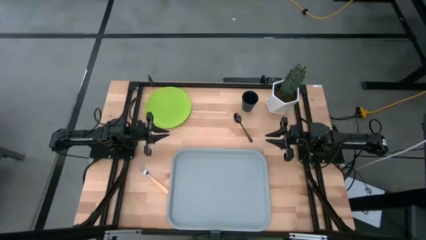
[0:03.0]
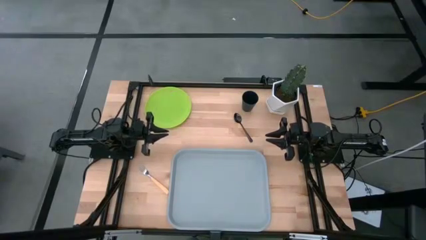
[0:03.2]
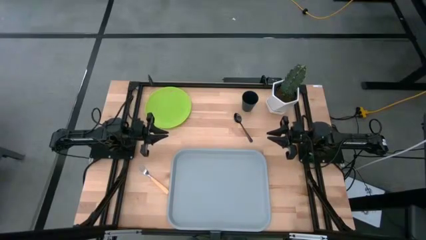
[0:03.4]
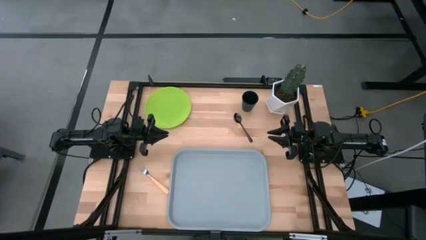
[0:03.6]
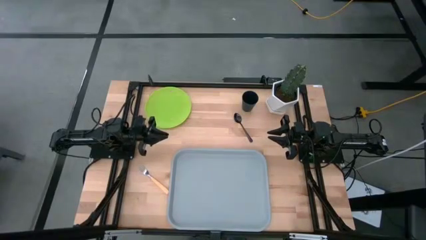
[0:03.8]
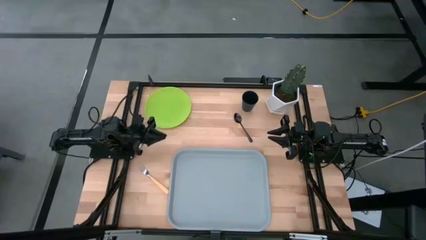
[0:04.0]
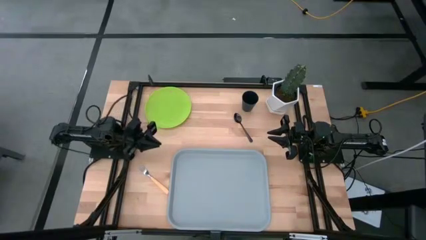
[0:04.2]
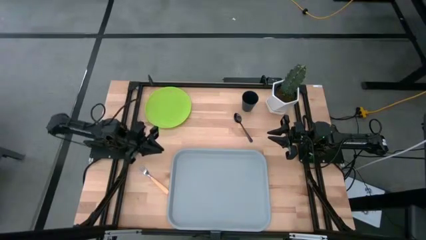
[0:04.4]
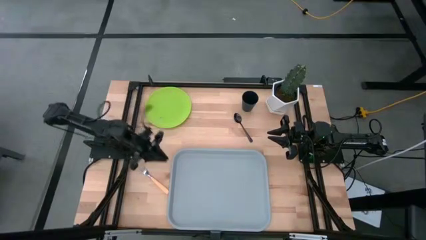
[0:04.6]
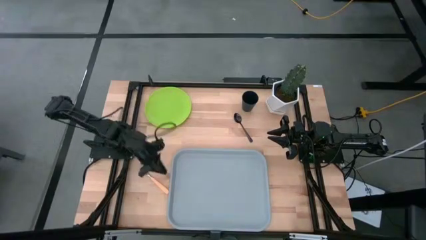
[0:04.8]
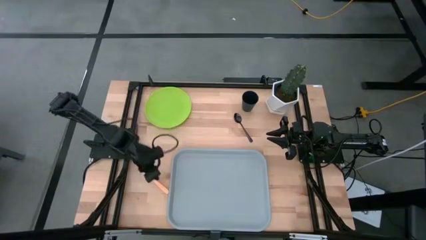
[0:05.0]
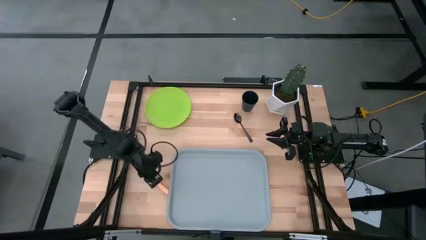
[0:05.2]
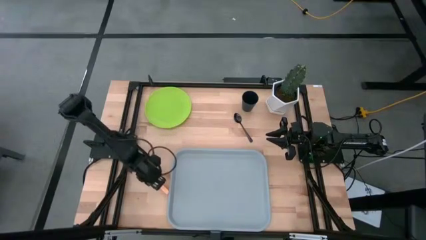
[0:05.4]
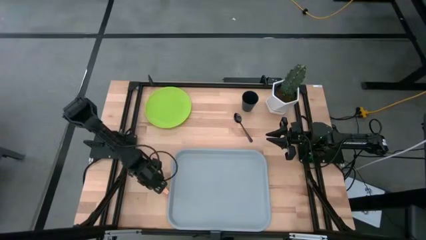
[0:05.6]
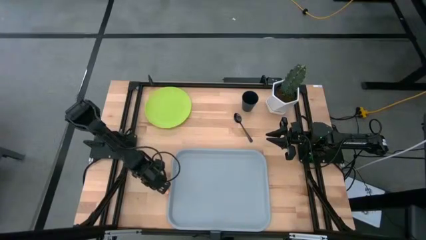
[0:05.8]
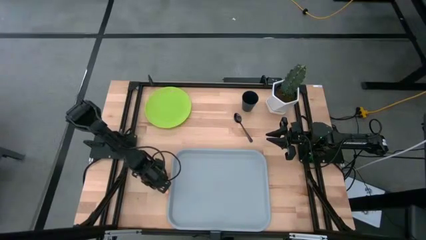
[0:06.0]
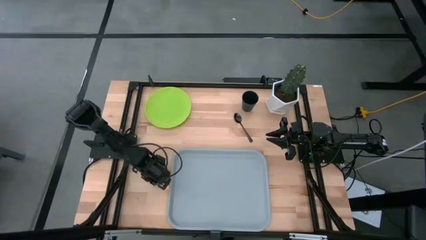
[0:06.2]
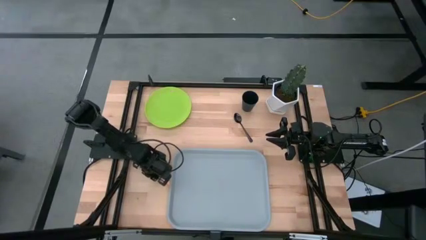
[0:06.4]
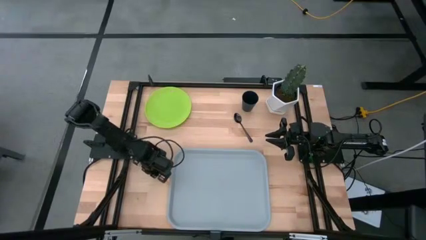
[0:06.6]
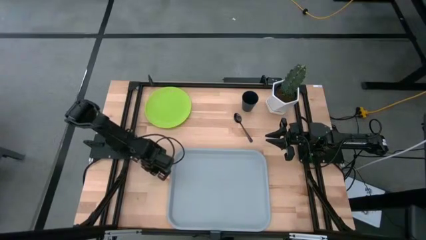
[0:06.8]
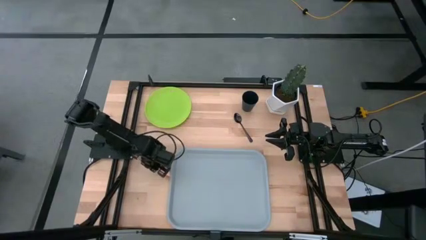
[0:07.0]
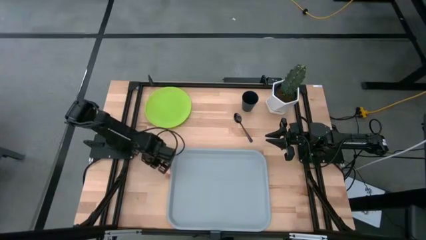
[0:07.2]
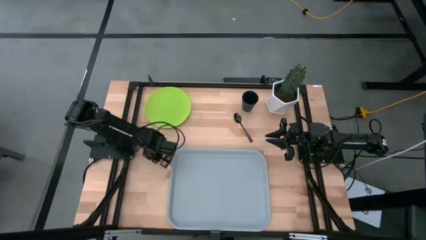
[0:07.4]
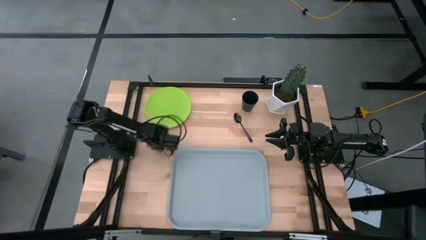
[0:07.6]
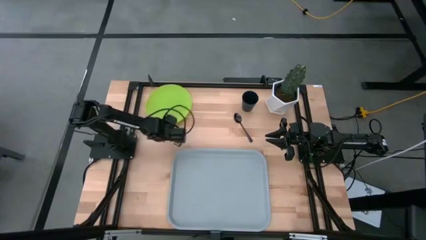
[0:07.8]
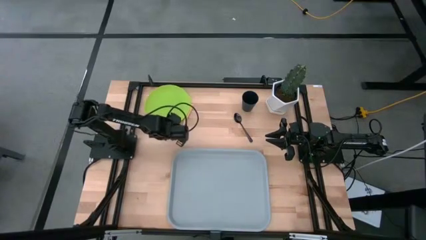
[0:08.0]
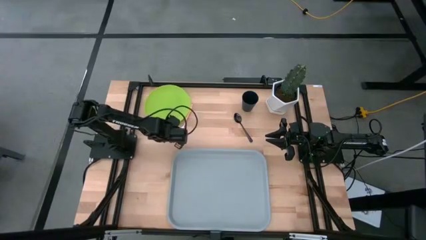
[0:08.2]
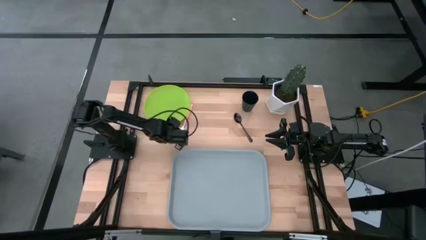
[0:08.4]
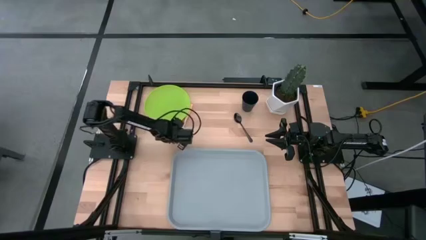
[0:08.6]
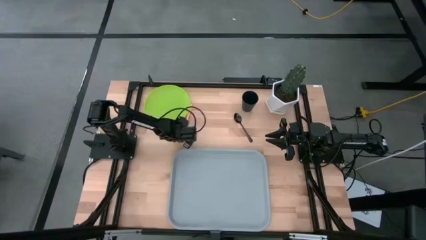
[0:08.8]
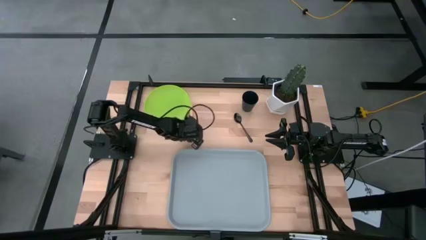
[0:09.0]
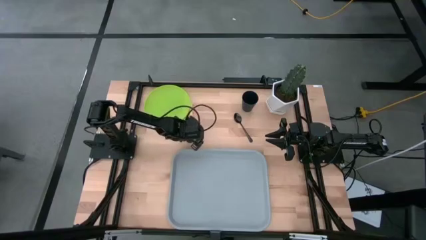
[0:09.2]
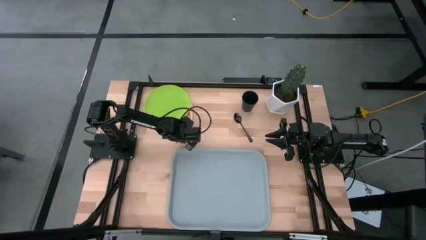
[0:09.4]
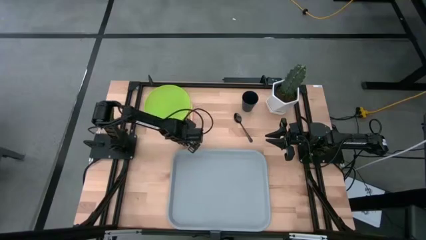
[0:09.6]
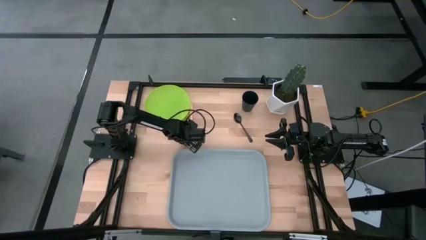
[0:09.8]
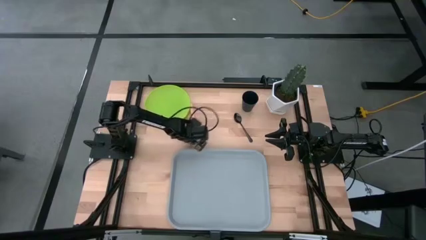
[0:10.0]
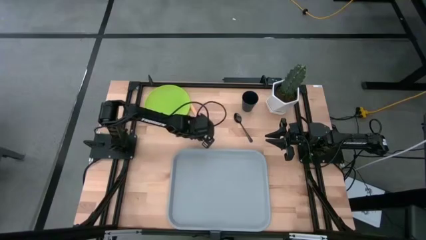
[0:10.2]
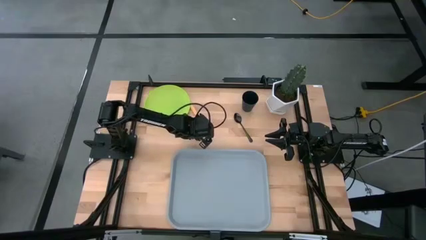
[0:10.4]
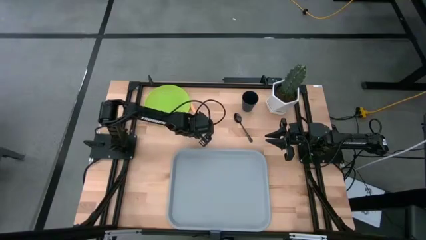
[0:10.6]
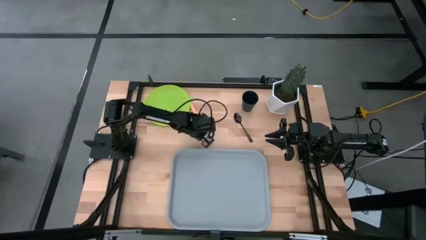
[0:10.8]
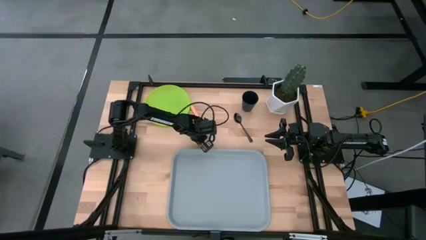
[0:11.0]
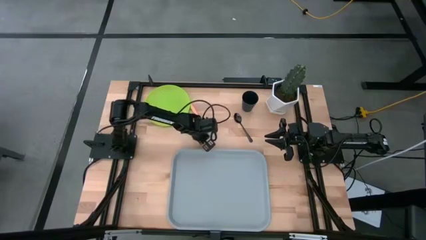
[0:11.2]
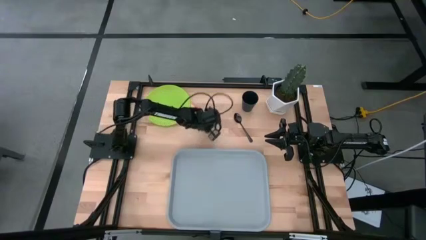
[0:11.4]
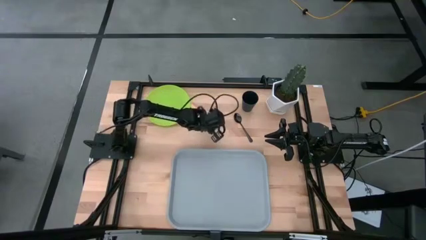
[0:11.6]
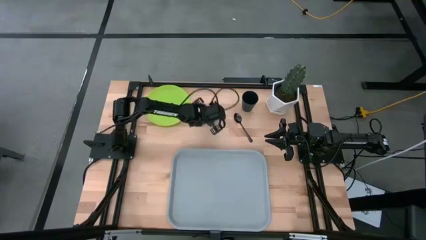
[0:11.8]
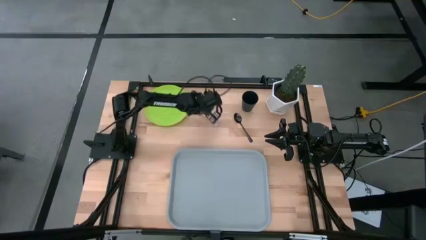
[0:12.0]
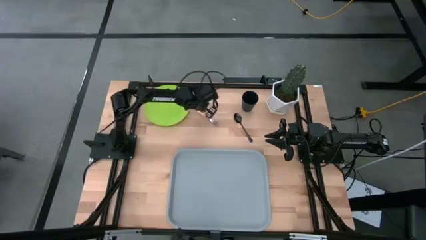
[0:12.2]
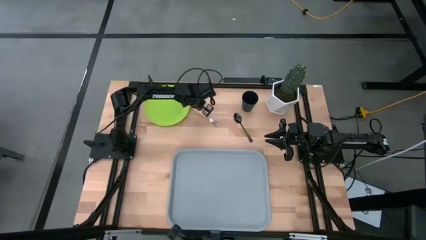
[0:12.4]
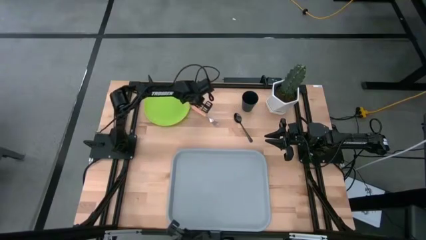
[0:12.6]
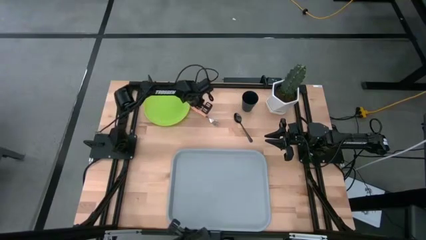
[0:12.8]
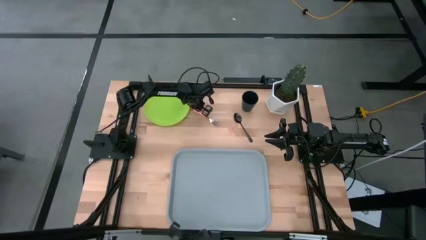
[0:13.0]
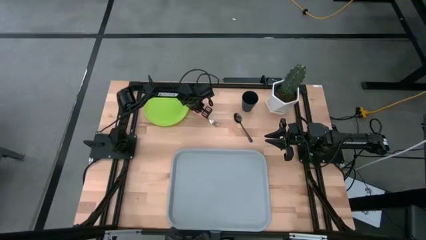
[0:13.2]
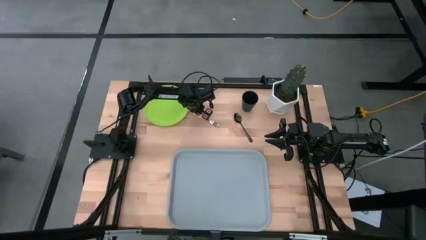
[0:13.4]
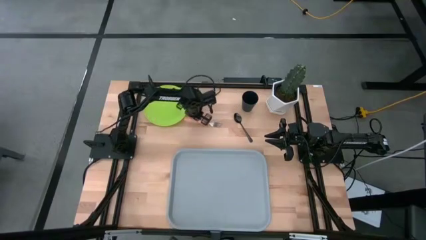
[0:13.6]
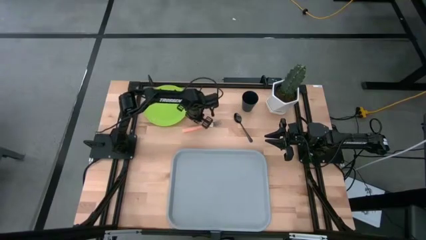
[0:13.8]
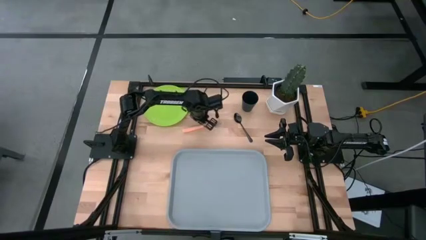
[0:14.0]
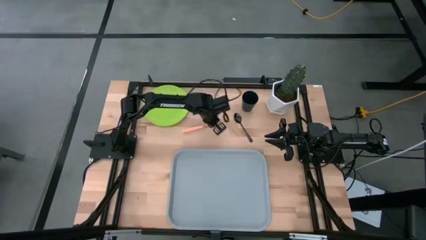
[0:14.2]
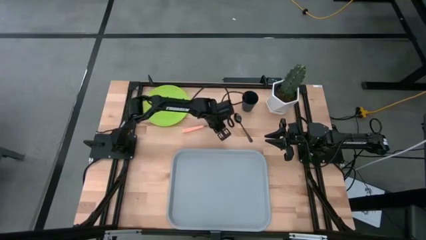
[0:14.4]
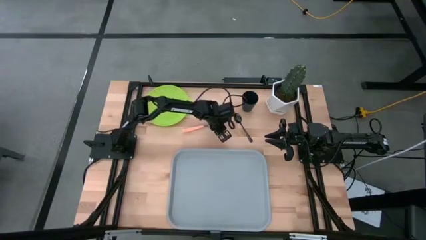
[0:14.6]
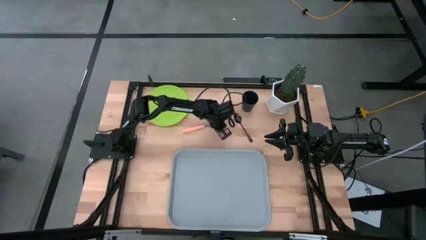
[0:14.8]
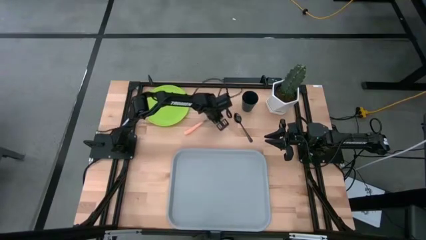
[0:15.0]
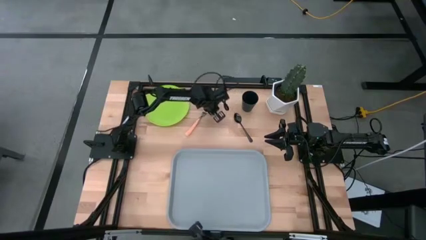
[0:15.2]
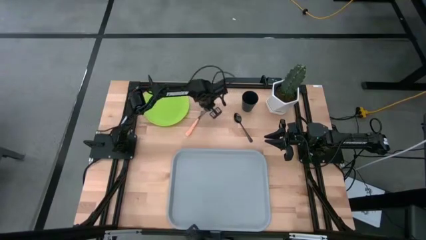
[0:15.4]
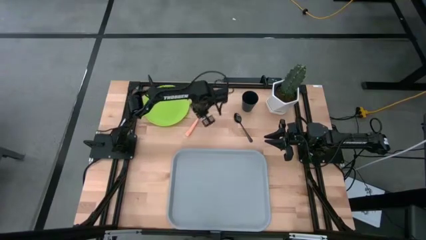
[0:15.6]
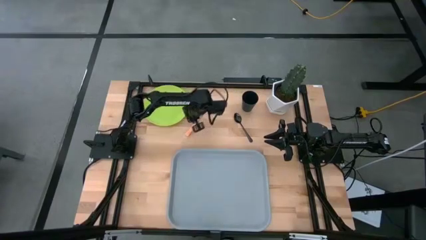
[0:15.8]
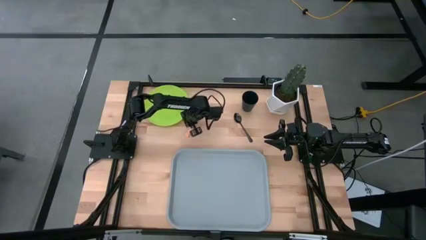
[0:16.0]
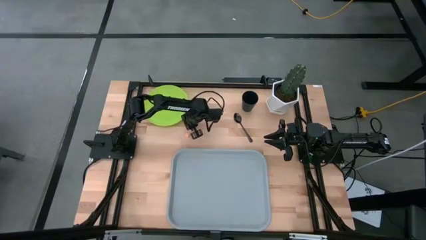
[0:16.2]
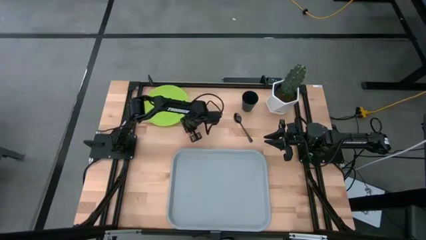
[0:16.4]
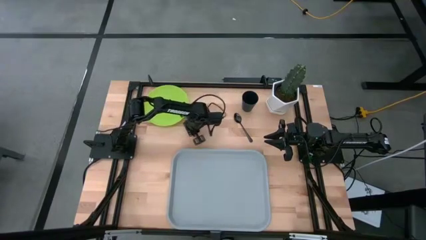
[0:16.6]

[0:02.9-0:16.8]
Task: Pick and place plate/cup/fork/spoon on tray
Move the orange fork to the top center of the table
